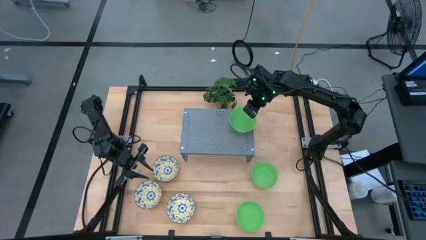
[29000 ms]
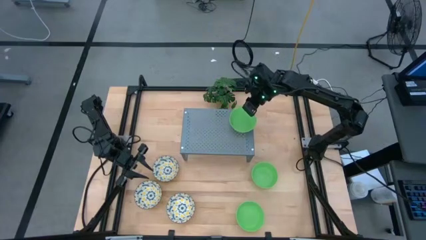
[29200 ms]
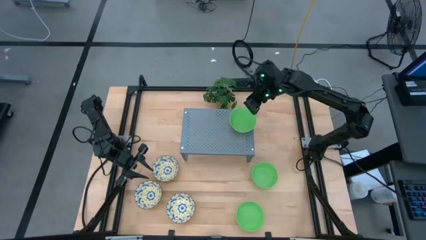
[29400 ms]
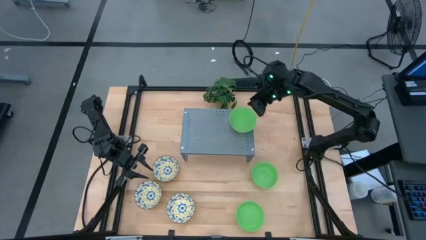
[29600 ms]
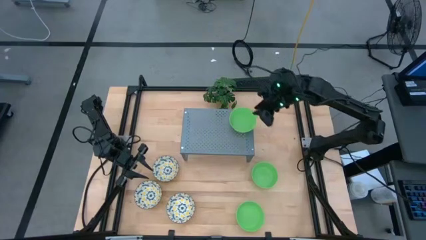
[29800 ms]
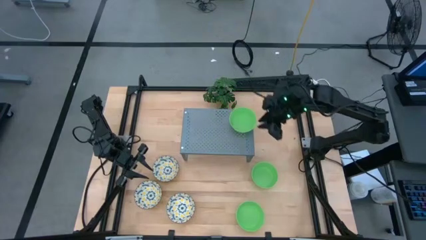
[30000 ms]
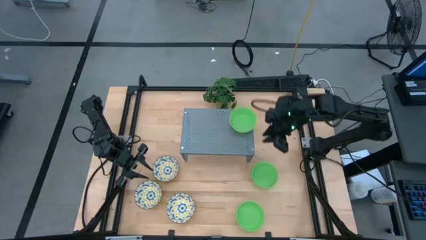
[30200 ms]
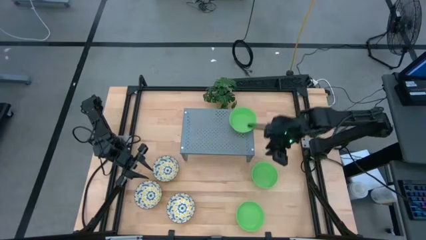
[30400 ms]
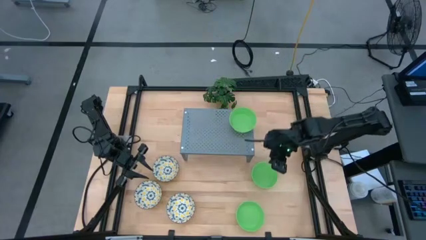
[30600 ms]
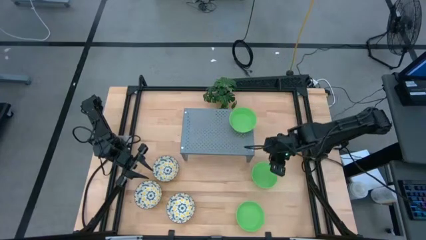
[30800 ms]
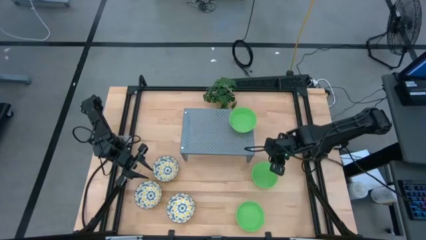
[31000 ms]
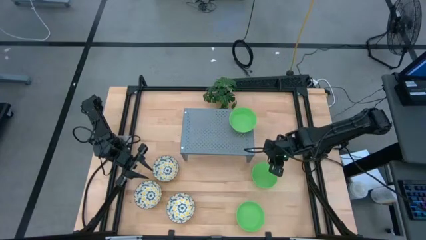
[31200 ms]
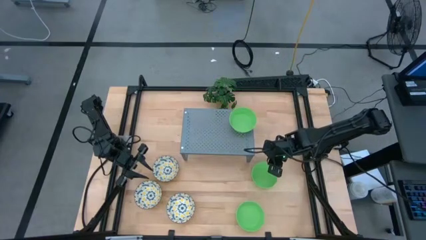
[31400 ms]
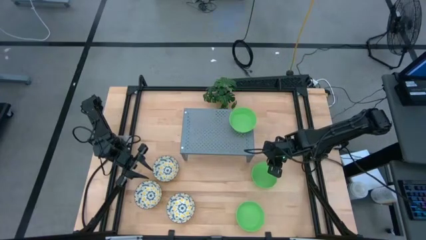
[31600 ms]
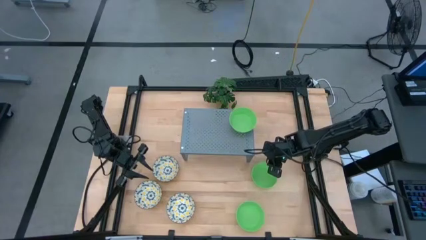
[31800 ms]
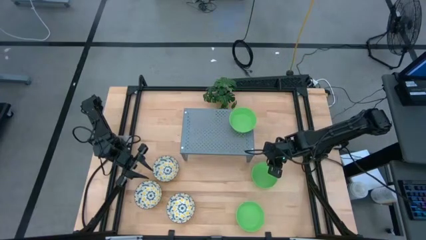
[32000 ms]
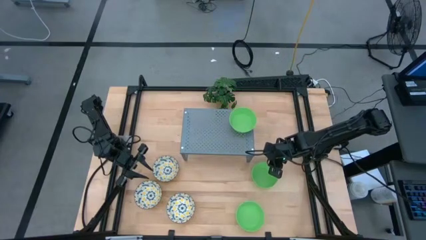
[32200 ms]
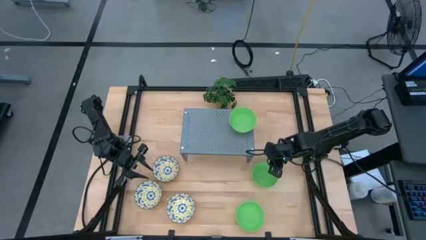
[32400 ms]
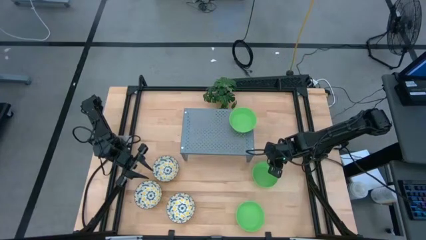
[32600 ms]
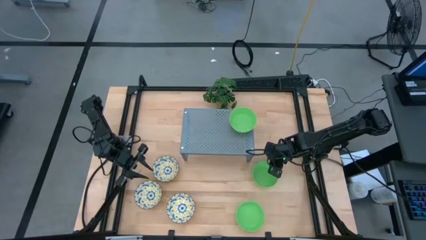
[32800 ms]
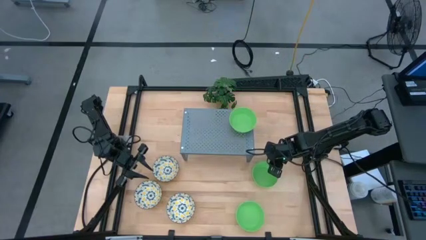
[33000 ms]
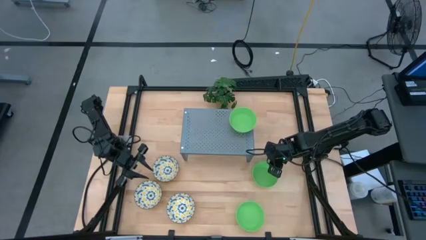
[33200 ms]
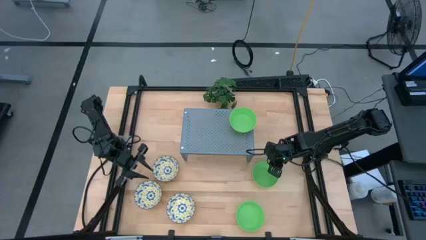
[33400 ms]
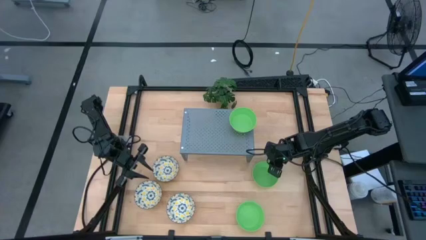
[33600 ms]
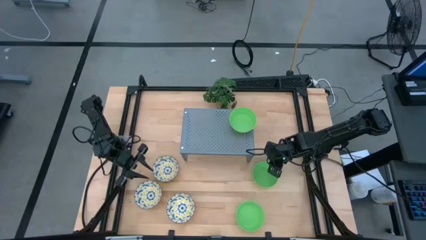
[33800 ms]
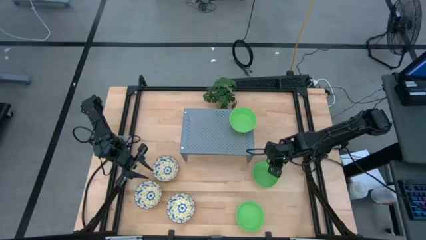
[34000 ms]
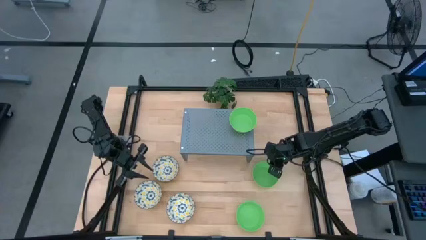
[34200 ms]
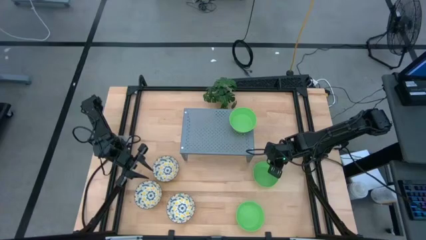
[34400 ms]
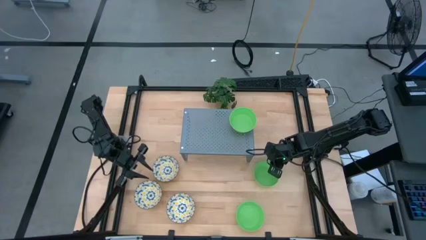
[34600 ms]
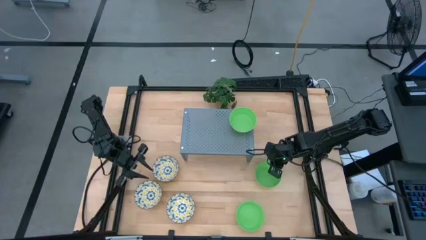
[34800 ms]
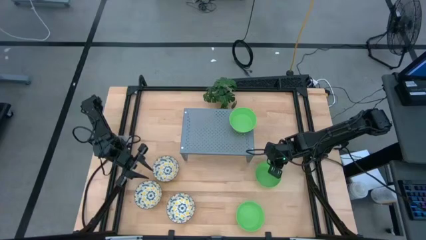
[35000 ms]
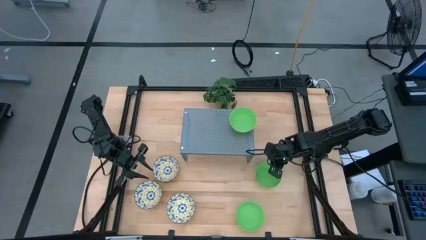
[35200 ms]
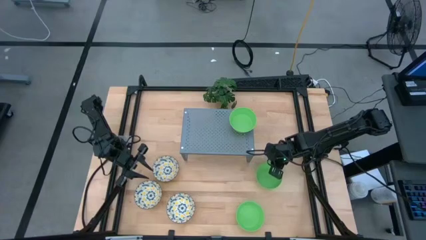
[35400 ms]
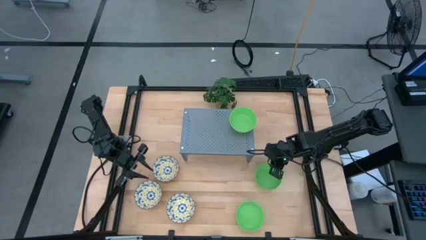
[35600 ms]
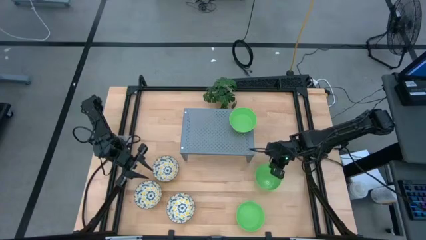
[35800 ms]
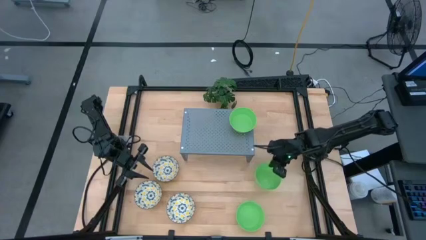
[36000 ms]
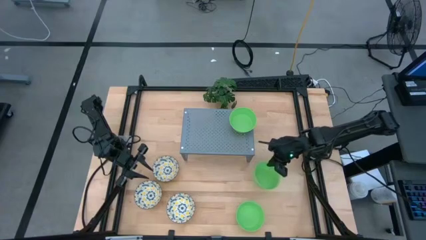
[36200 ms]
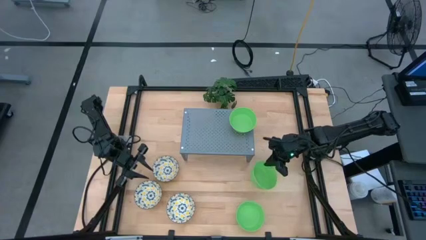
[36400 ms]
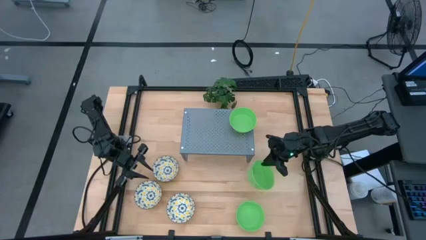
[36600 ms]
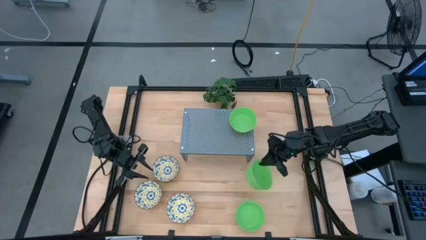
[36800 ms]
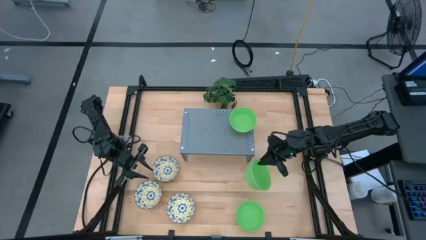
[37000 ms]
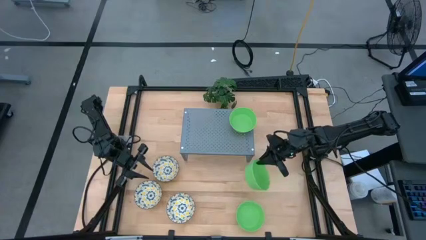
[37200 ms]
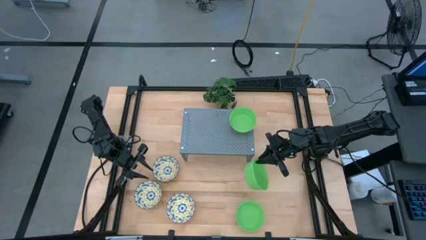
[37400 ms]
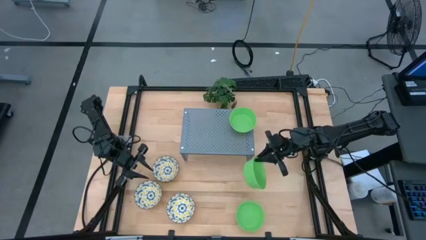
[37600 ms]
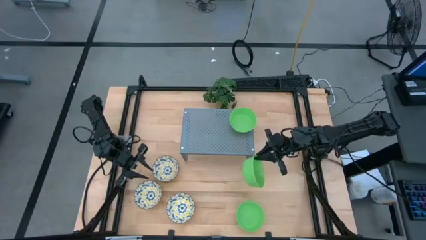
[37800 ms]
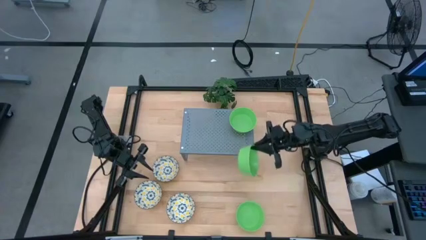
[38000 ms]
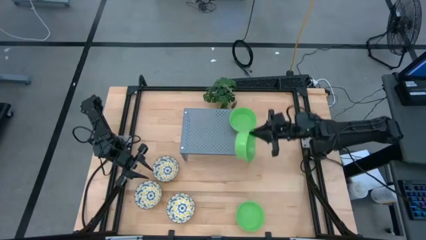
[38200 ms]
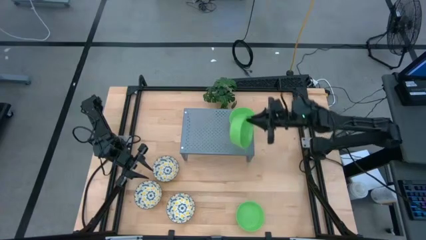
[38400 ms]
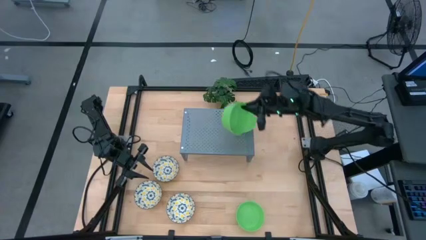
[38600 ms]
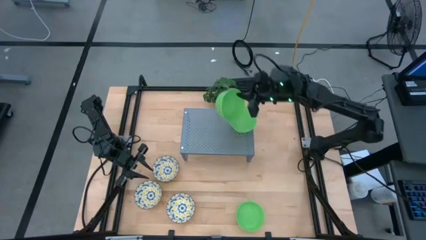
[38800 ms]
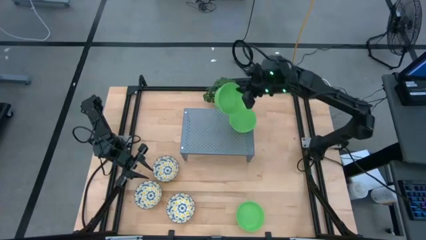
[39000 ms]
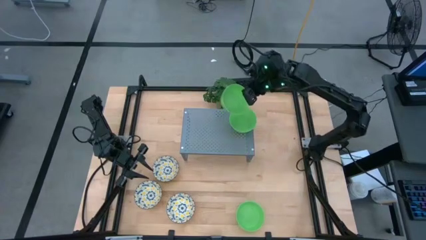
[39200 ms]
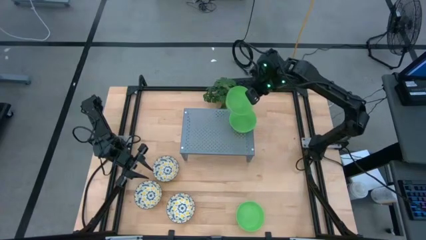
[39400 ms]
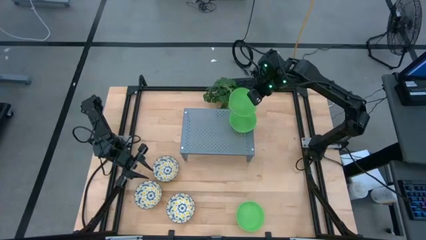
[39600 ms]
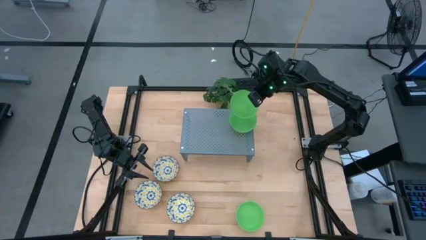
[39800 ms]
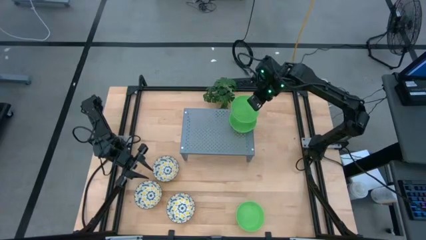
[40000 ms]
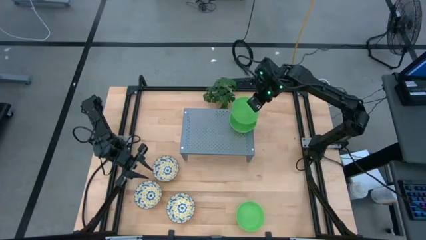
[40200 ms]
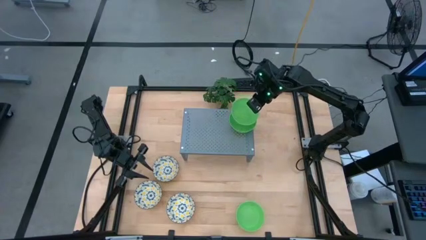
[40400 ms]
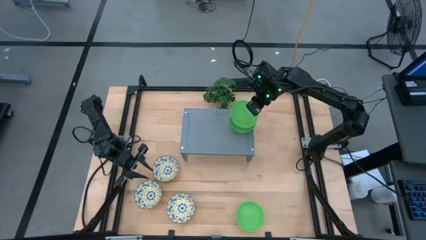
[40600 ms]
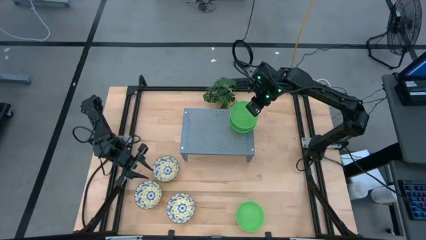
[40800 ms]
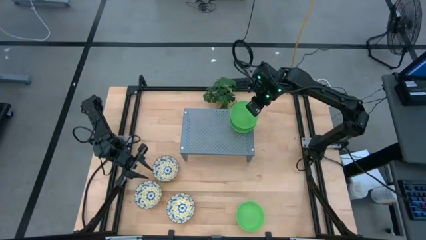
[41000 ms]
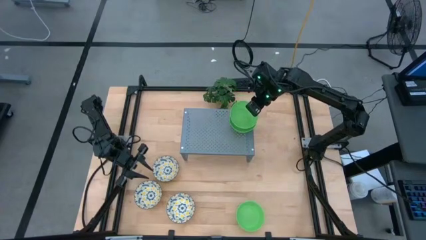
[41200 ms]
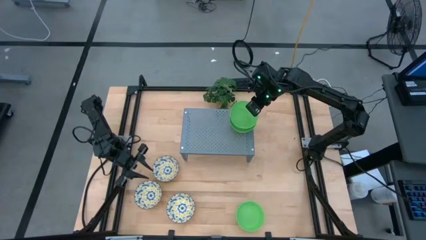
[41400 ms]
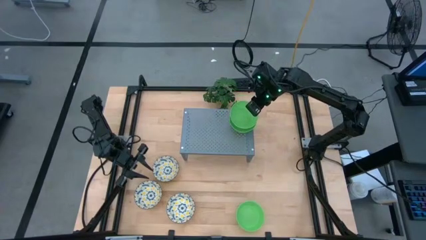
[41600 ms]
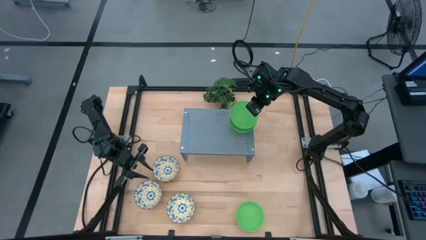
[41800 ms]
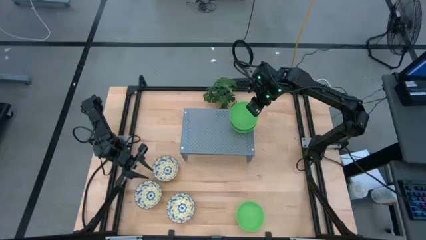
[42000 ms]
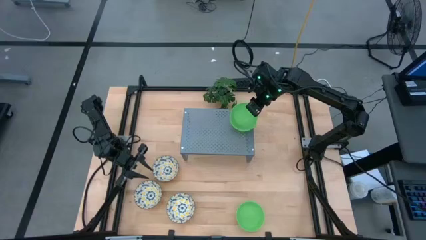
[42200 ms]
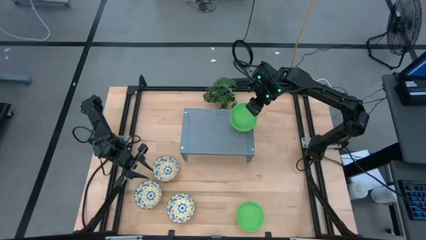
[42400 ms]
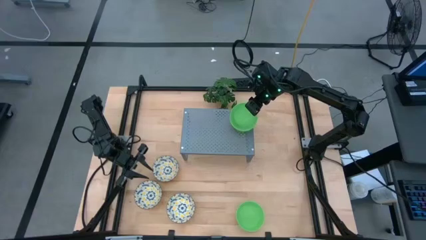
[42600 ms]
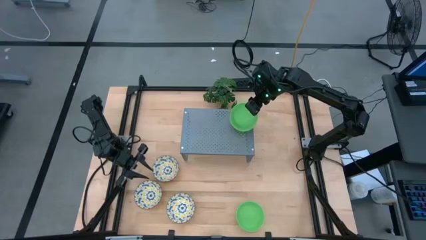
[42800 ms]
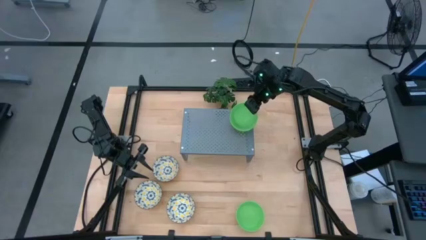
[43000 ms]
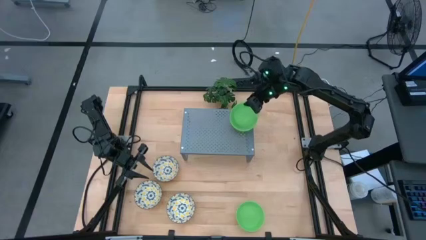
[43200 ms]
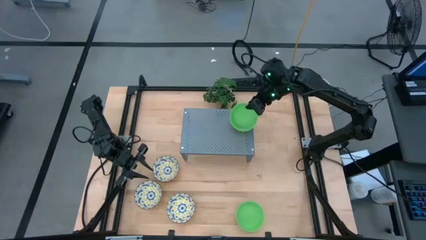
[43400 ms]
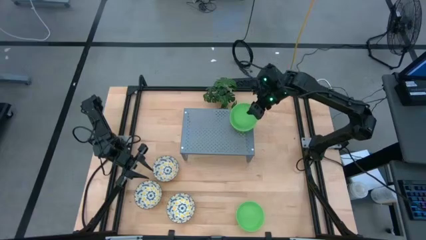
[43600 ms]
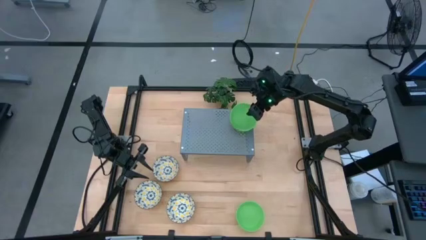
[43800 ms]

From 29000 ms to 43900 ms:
Task: Pick & Place Mini bowls
Stack the top green bowl on the green bowl on the shelf

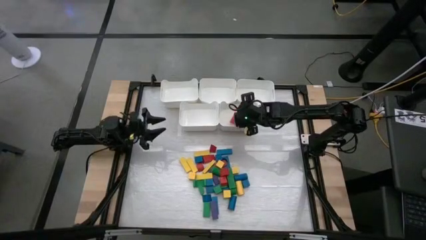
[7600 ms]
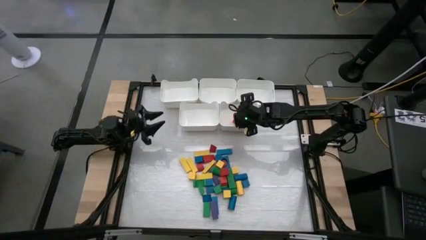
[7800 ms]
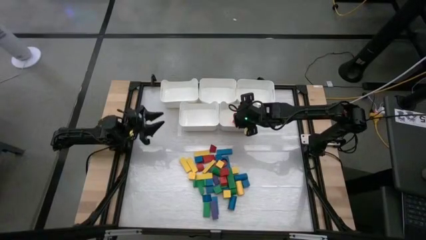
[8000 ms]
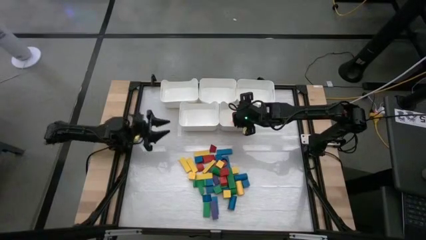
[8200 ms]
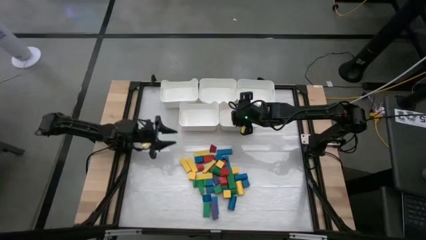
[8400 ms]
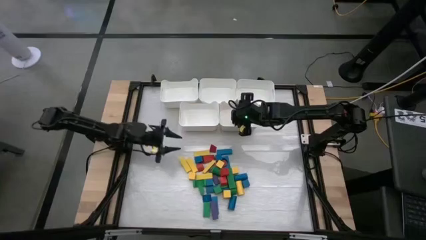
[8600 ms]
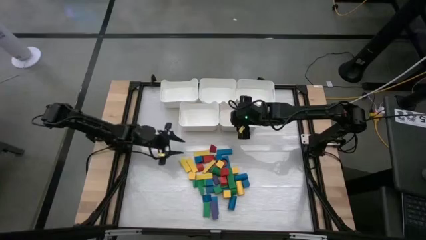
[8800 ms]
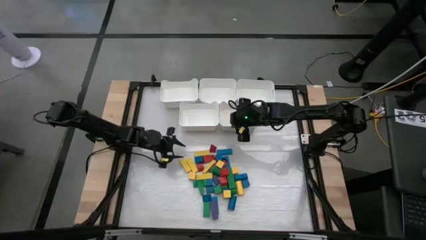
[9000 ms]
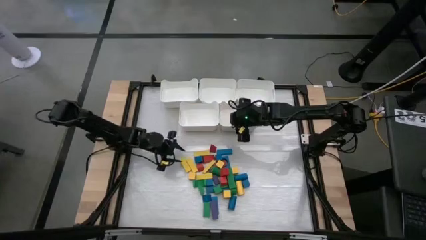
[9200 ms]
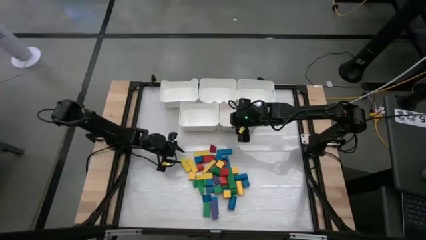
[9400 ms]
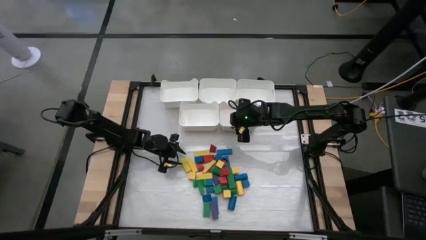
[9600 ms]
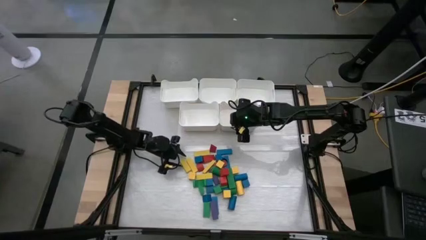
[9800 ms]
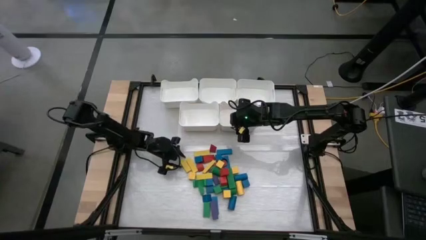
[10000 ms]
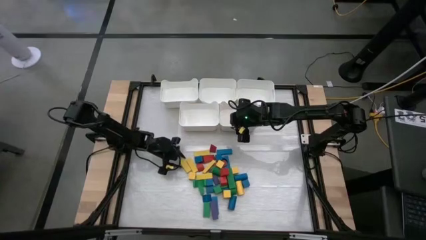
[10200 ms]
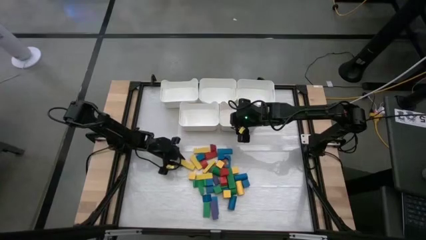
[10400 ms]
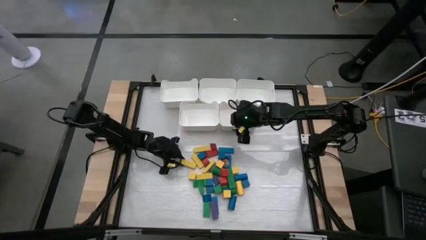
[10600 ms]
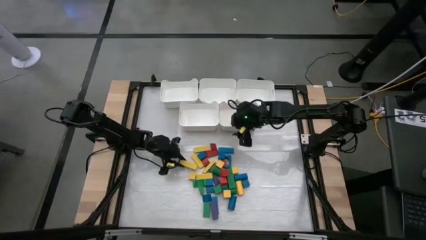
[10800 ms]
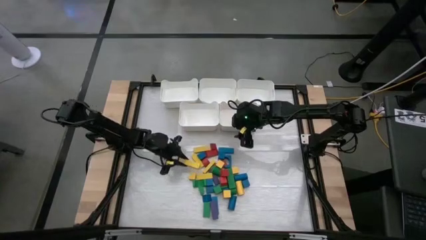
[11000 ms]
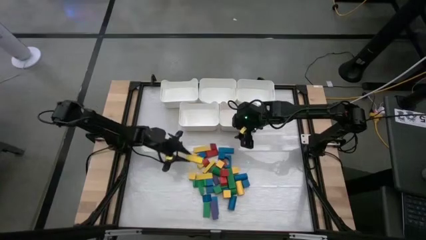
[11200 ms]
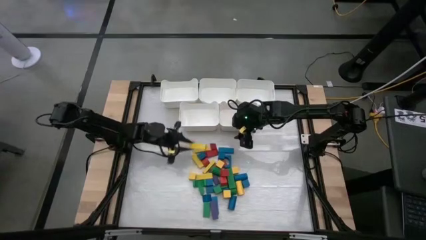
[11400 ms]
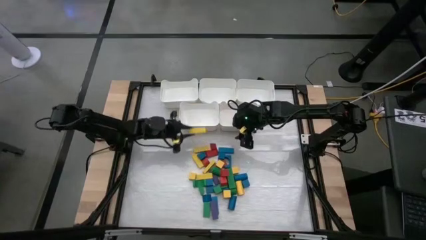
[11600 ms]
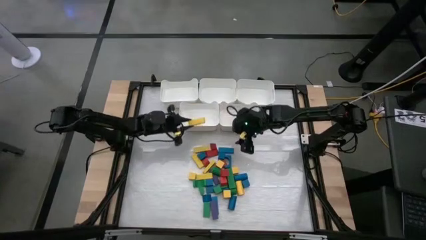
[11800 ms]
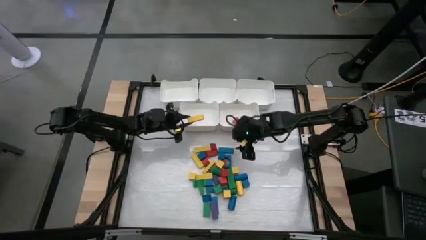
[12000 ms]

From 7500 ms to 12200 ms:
Task: Sort blocks
Put the yellow block into the bottom left bin
